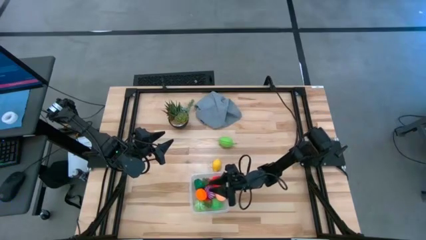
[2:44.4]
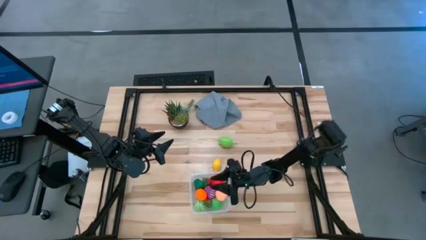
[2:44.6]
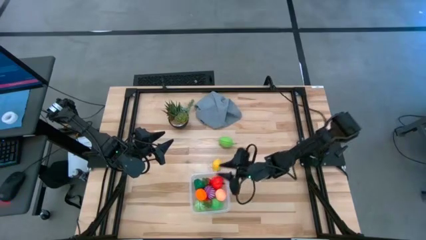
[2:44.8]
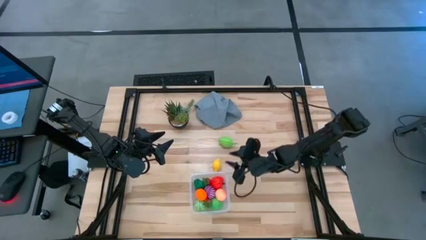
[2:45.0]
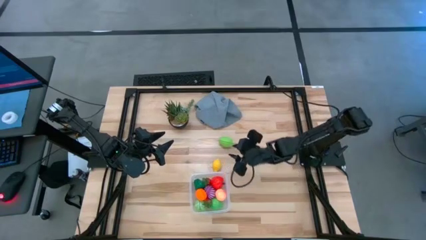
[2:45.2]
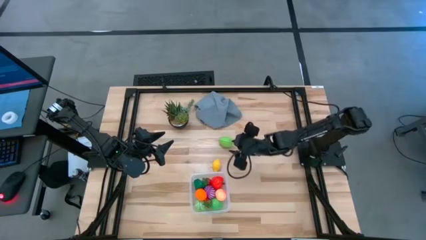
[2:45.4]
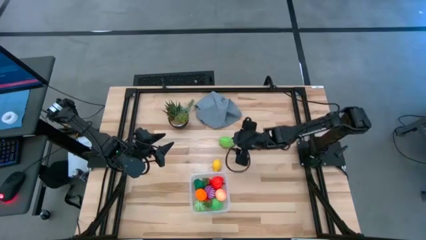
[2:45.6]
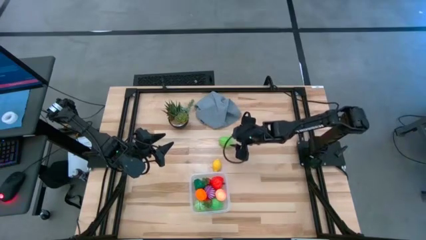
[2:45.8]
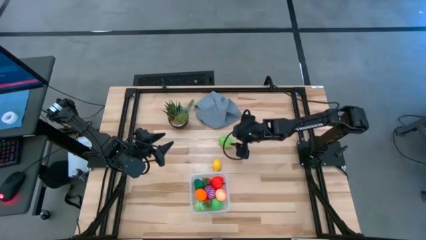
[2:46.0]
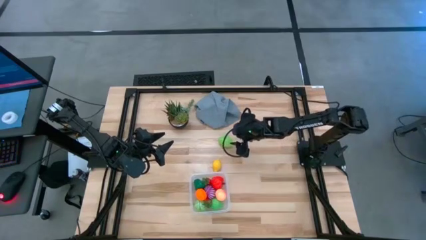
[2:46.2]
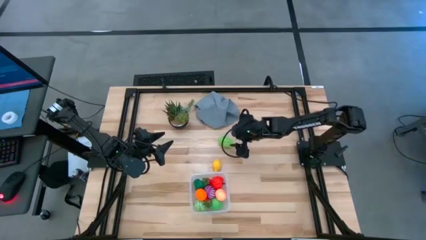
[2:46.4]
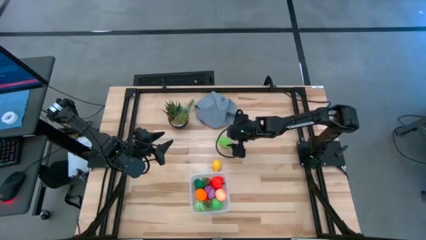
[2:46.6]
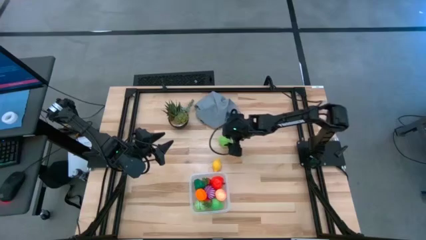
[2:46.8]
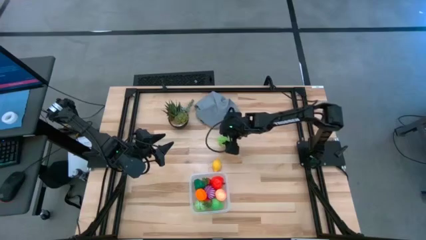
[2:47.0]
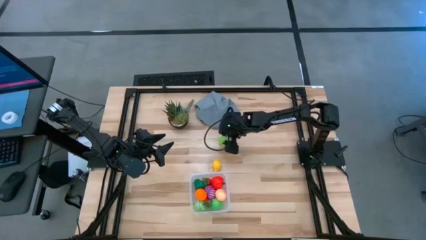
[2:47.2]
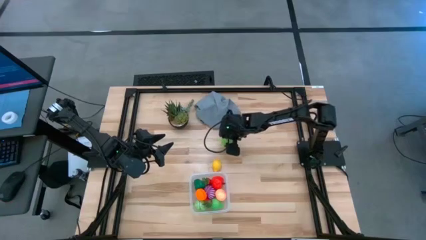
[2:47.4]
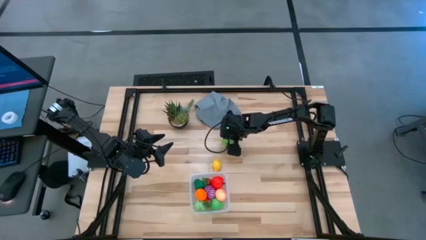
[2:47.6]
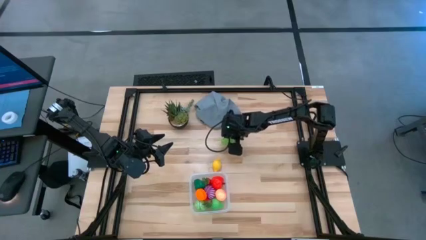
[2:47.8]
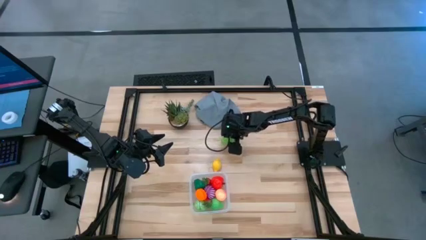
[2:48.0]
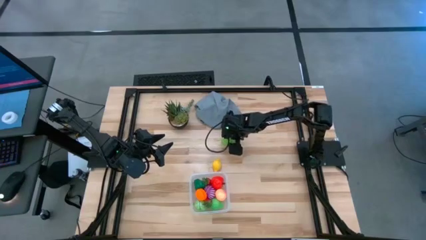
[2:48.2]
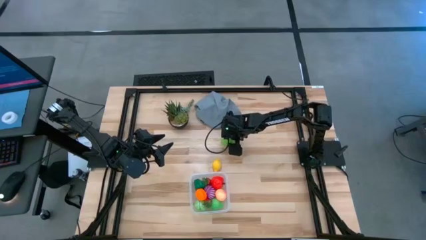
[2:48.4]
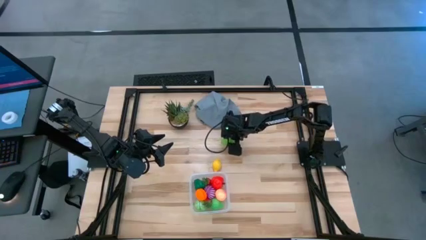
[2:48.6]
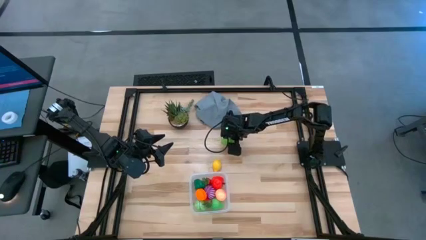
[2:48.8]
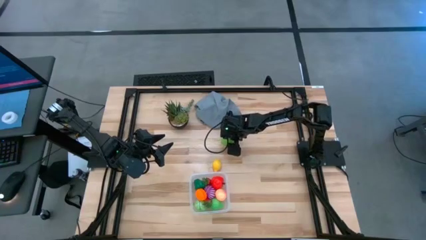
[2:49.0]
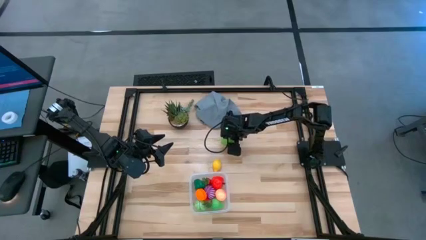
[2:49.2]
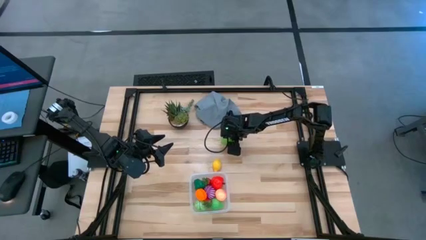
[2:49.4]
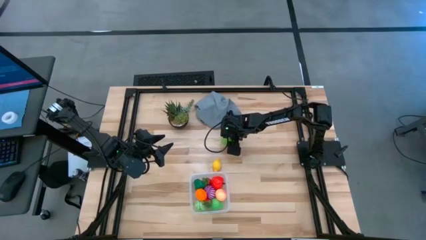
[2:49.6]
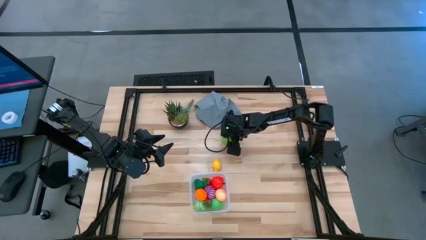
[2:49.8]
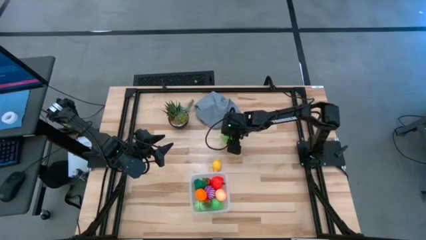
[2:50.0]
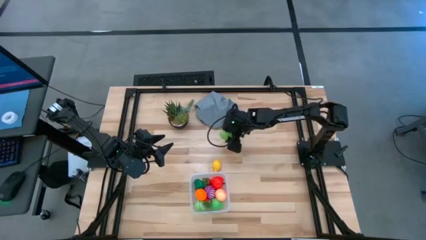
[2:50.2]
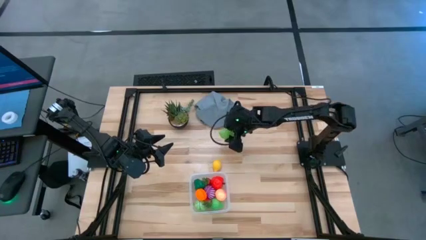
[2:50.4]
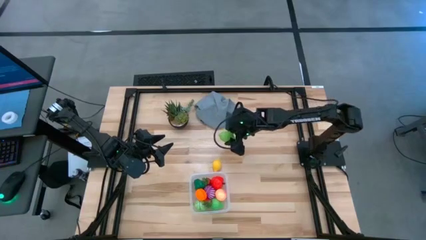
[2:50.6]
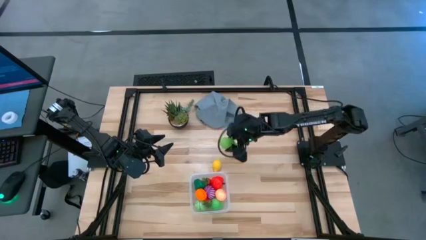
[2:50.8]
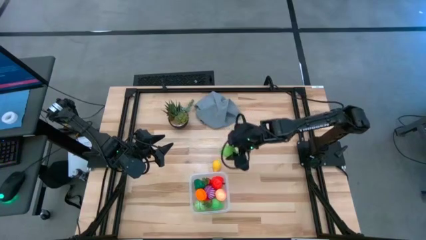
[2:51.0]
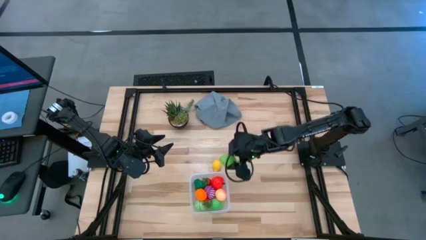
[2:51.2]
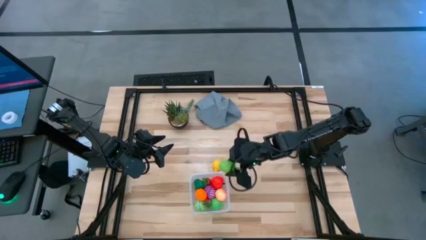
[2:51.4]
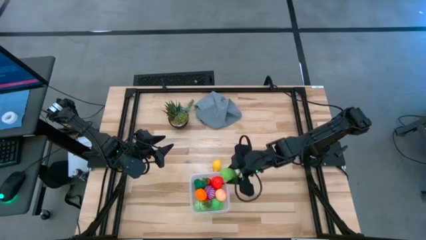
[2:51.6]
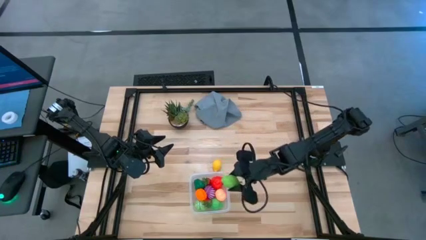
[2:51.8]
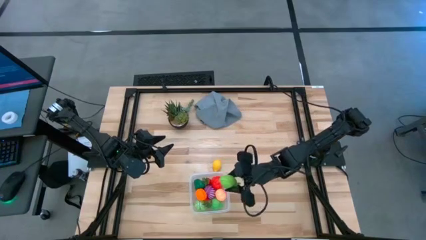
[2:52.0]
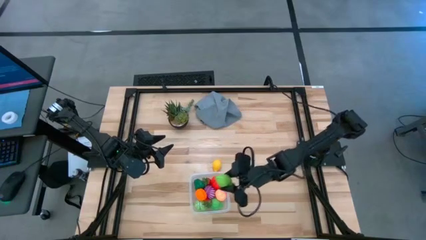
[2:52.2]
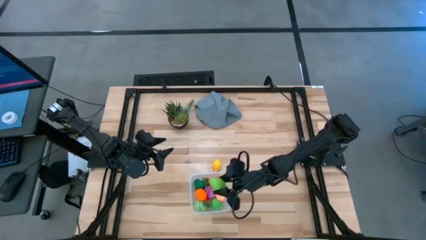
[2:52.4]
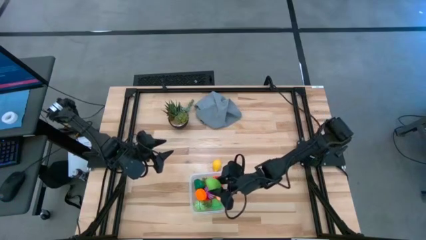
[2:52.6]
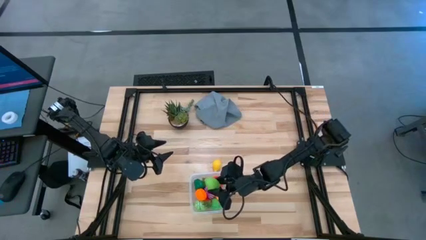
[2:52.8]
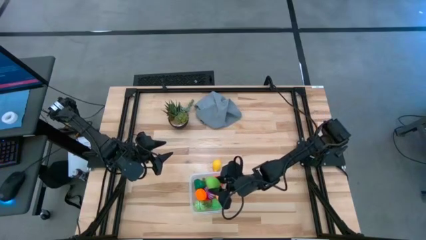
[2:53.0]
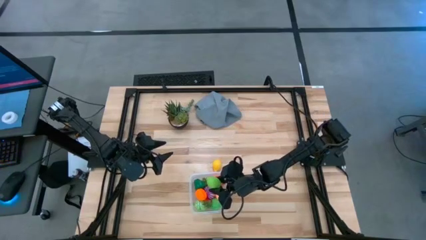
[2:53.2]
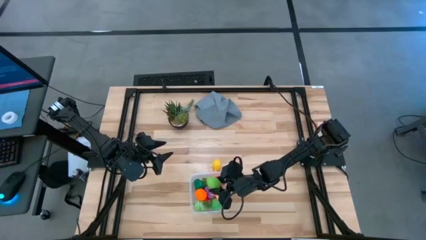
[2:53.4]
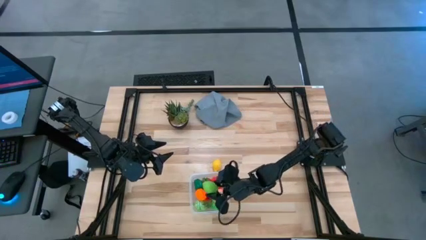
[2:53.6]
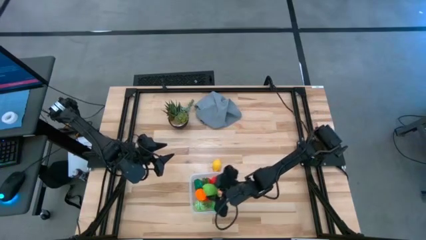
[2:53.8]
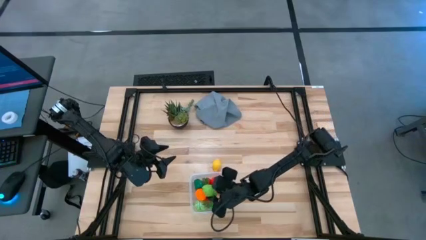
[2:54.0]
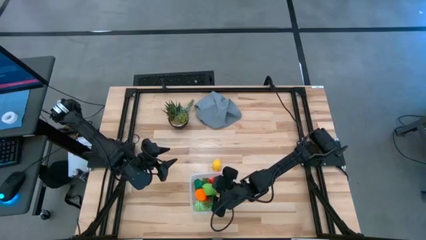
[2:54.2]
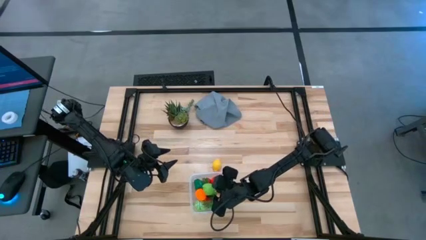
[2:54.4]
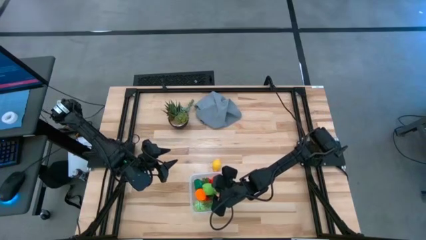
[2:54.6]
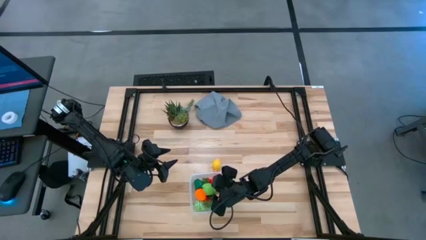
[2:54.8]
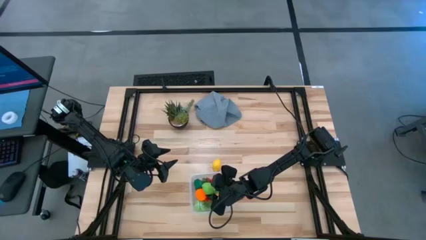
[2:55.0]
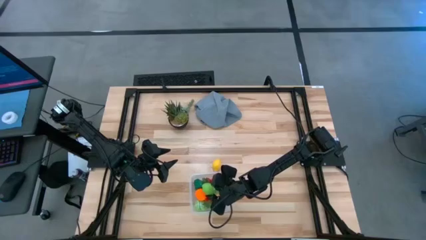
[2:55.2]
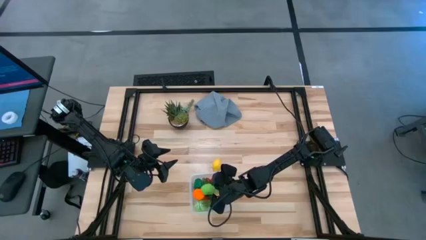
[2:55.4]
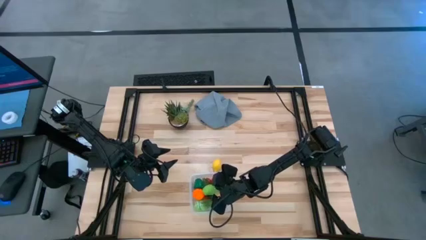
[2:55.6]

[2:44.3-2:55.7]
Task: Pick and placing Produce into tupperware
Put the melon into the transparent bin
